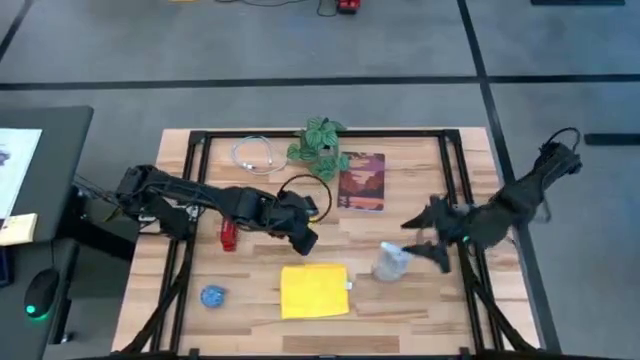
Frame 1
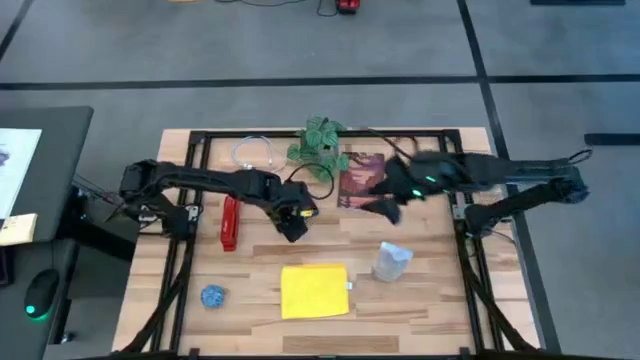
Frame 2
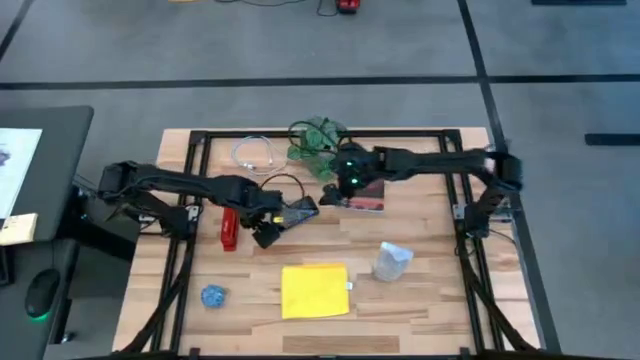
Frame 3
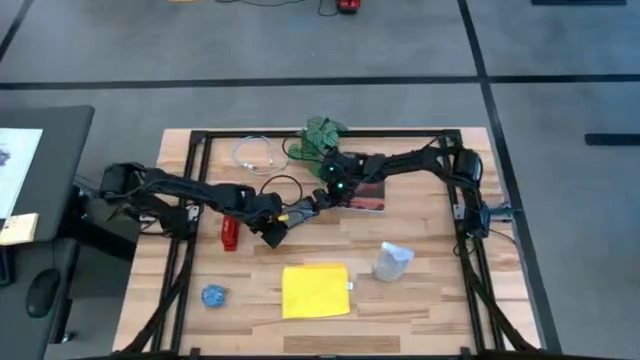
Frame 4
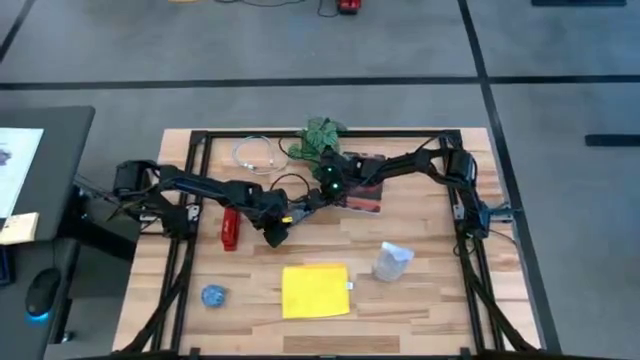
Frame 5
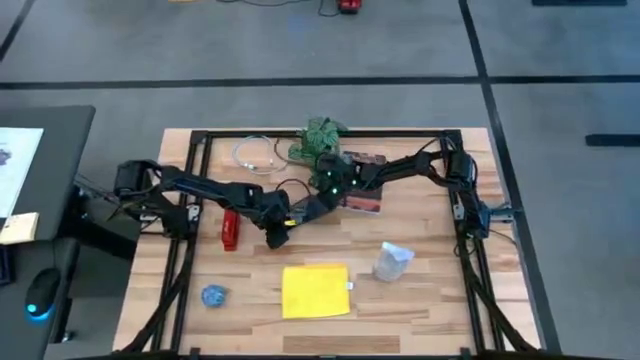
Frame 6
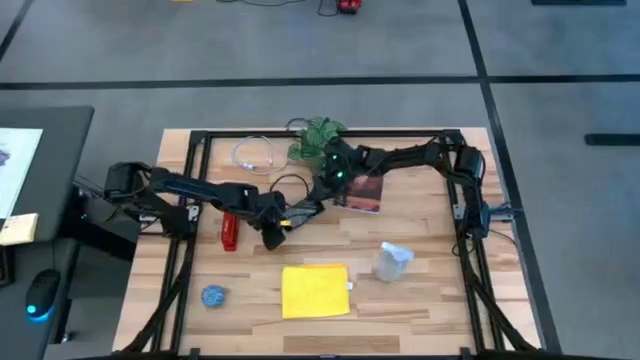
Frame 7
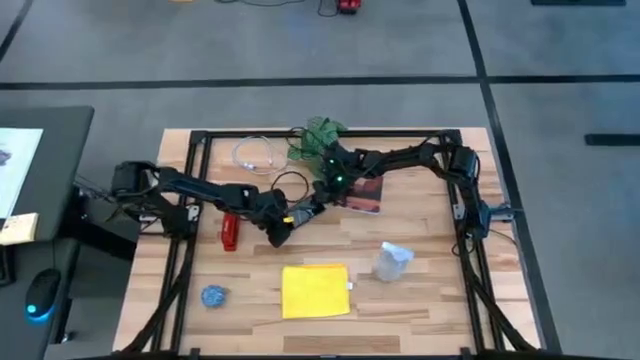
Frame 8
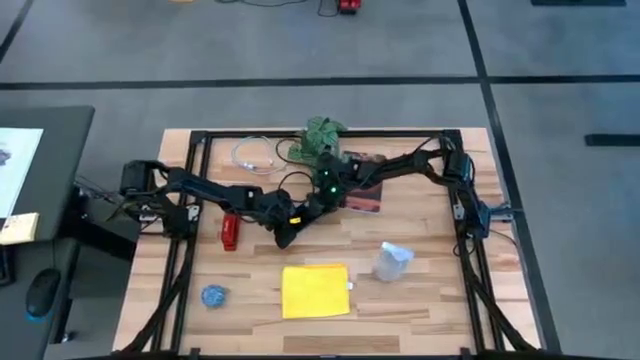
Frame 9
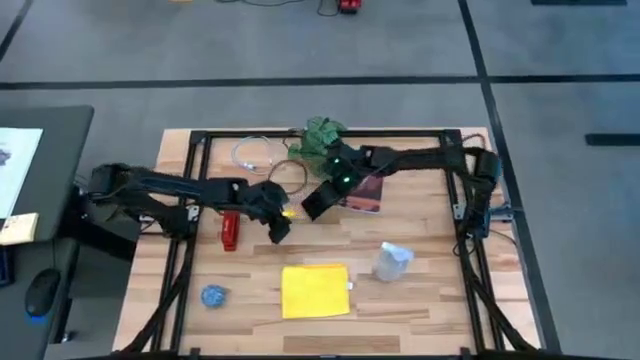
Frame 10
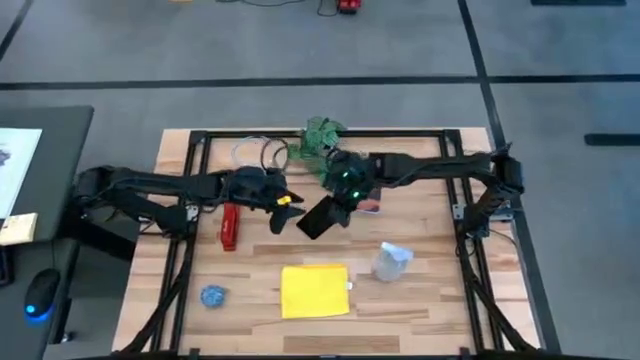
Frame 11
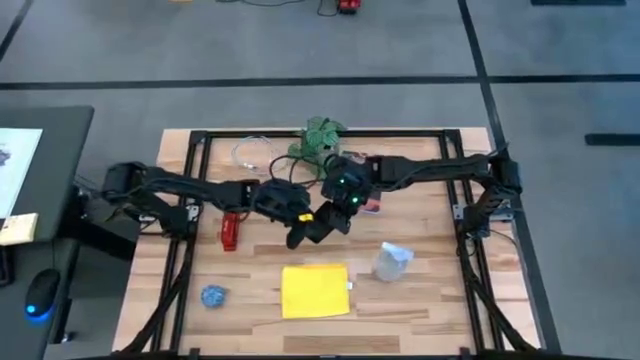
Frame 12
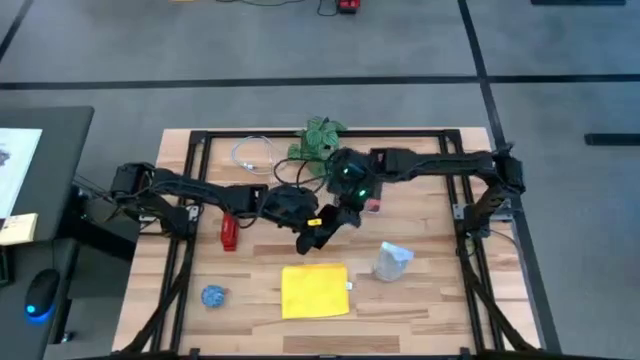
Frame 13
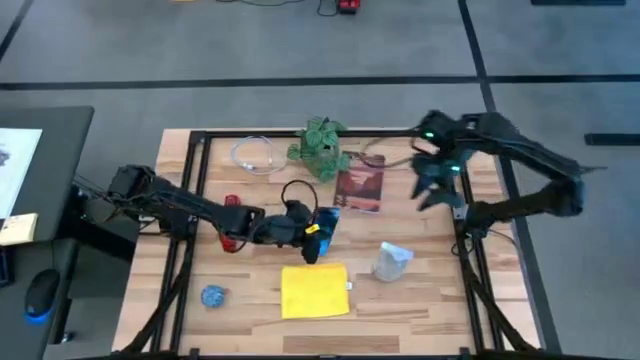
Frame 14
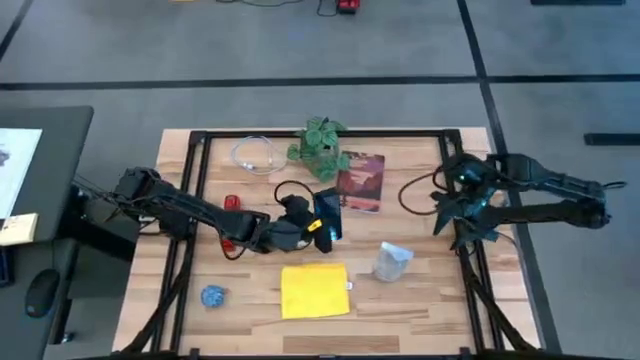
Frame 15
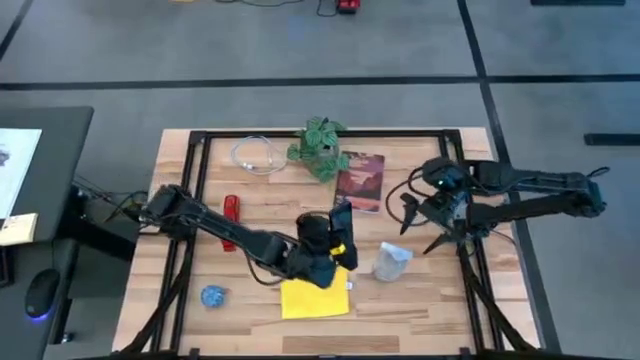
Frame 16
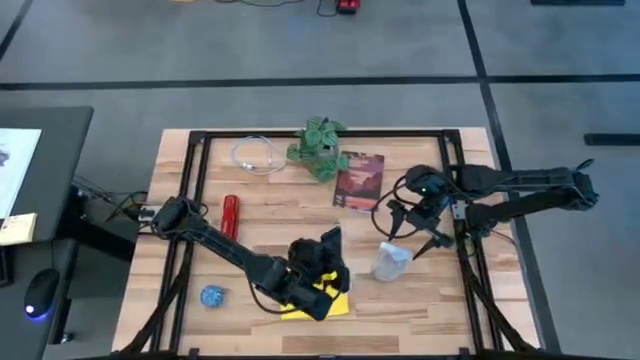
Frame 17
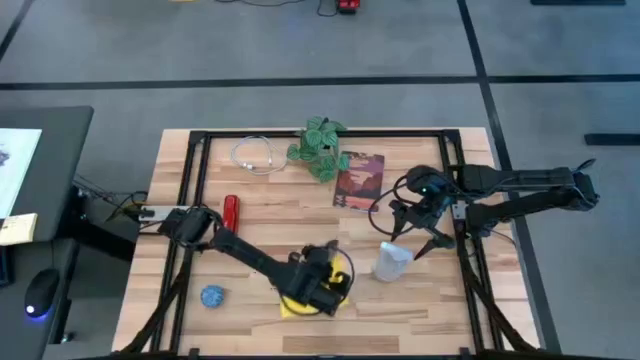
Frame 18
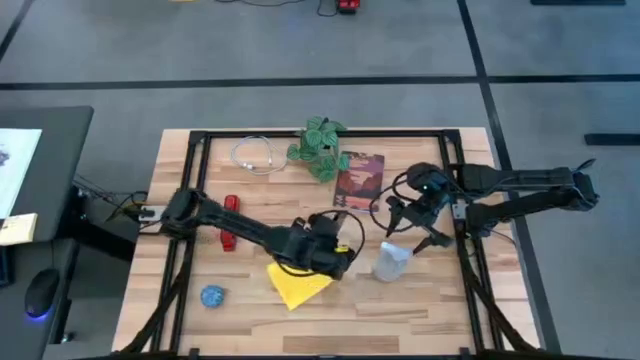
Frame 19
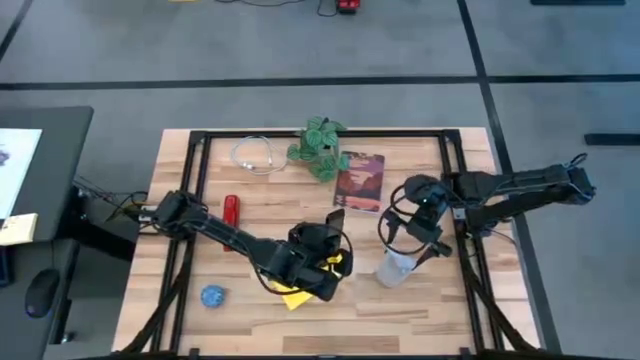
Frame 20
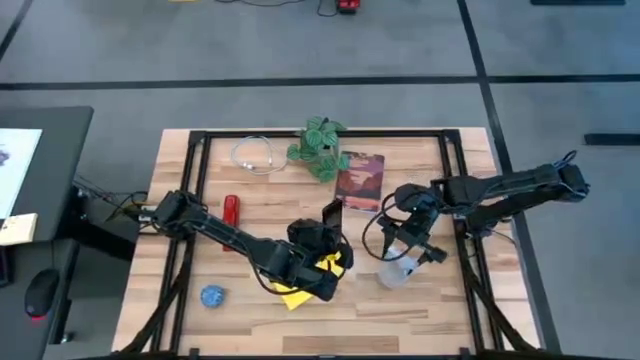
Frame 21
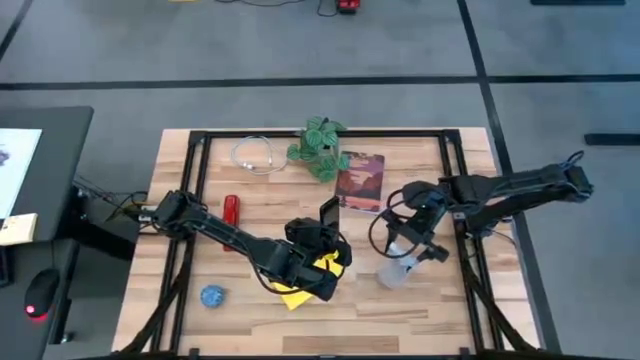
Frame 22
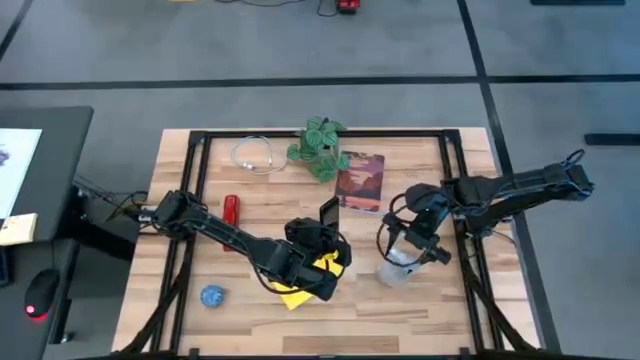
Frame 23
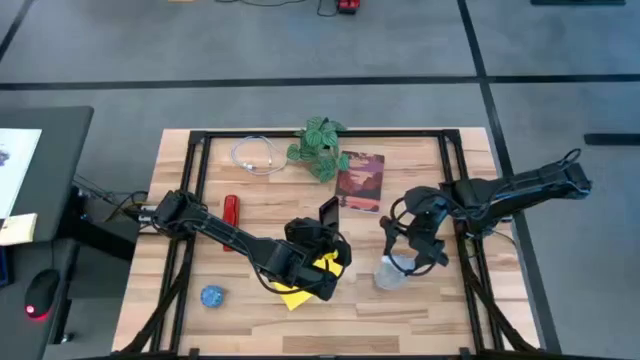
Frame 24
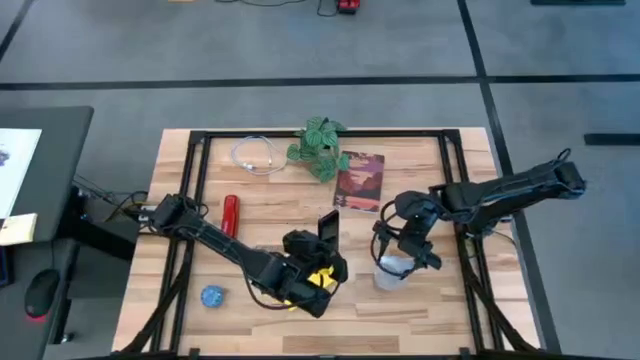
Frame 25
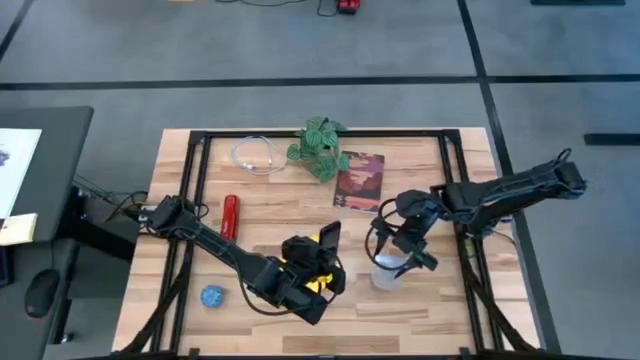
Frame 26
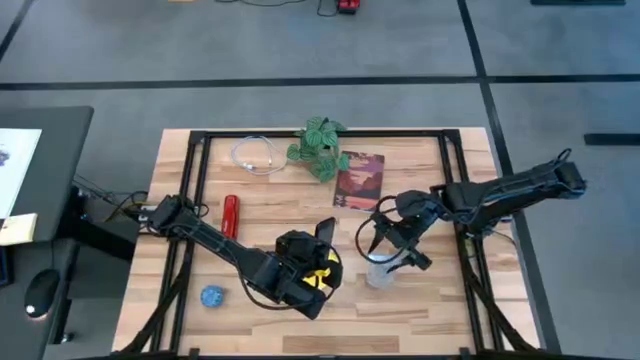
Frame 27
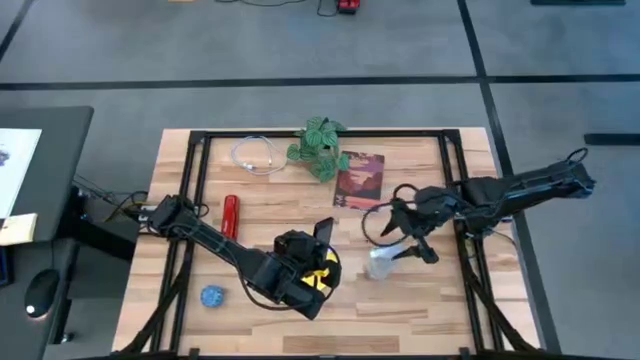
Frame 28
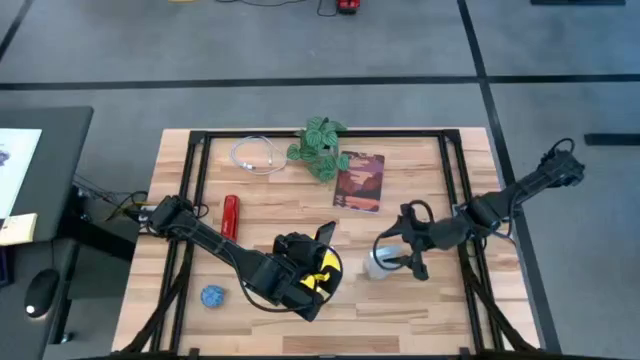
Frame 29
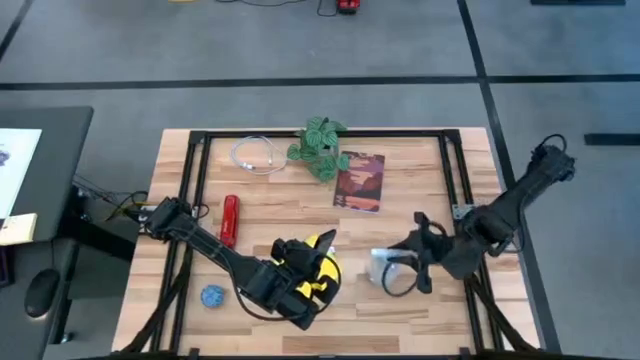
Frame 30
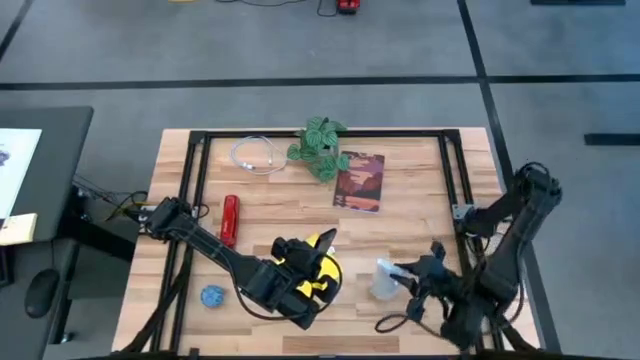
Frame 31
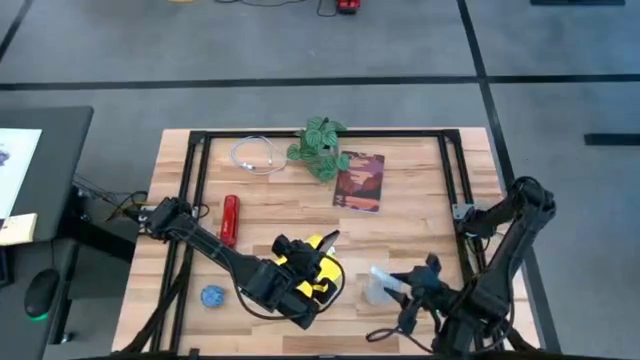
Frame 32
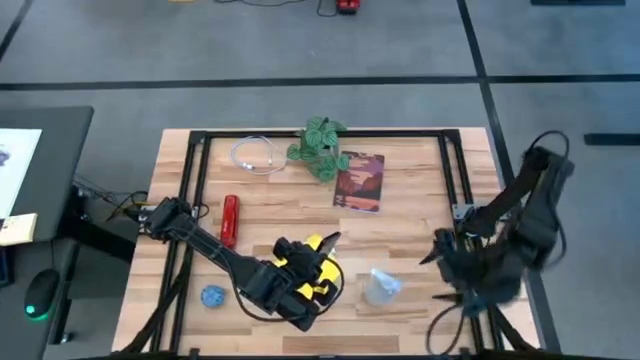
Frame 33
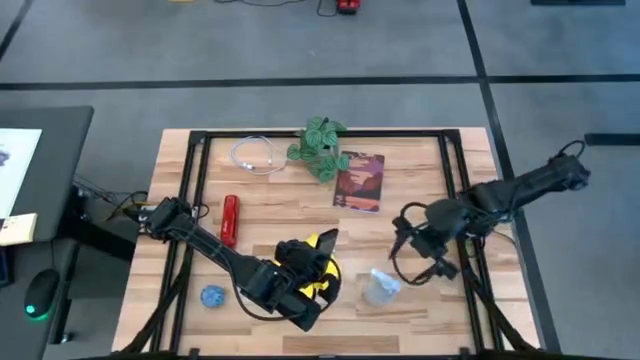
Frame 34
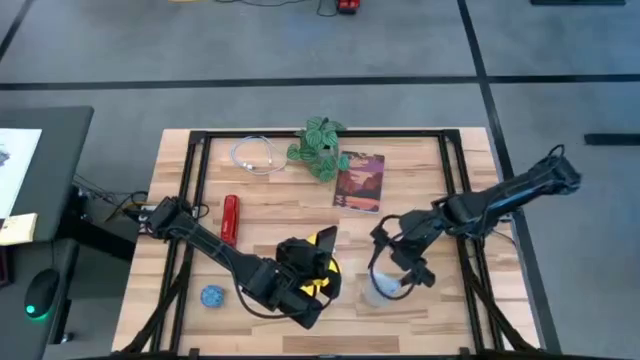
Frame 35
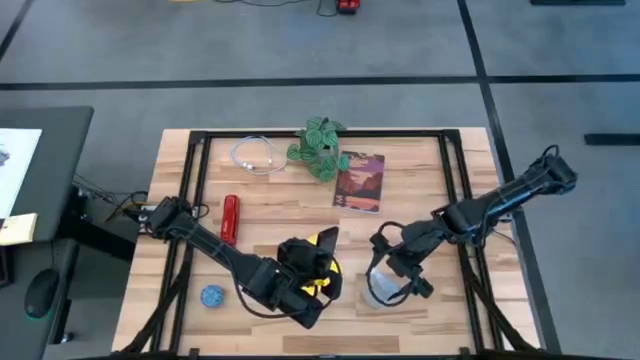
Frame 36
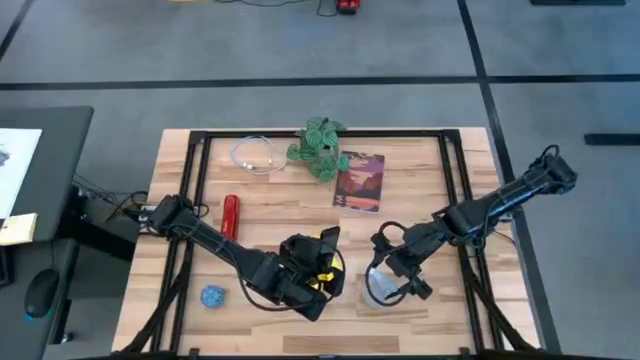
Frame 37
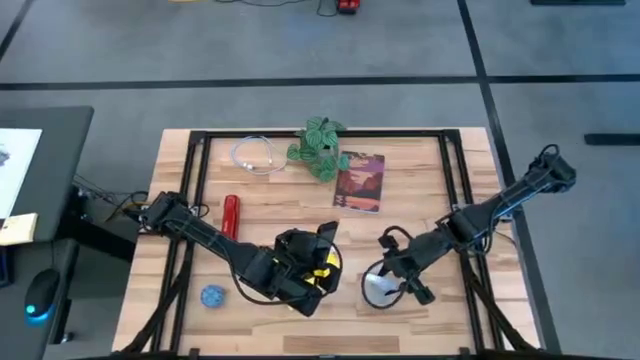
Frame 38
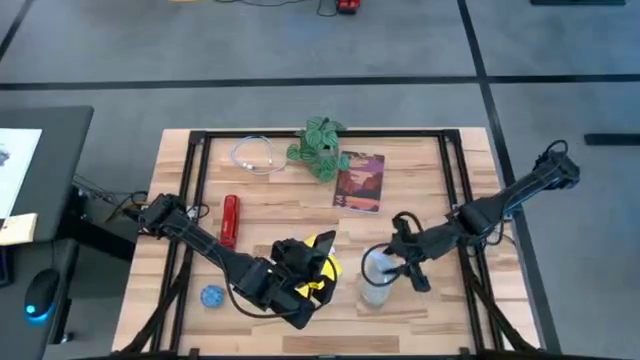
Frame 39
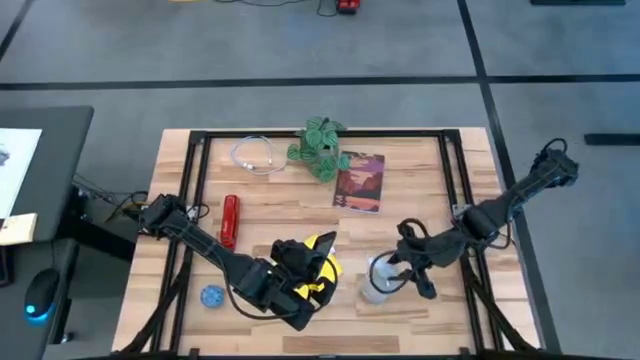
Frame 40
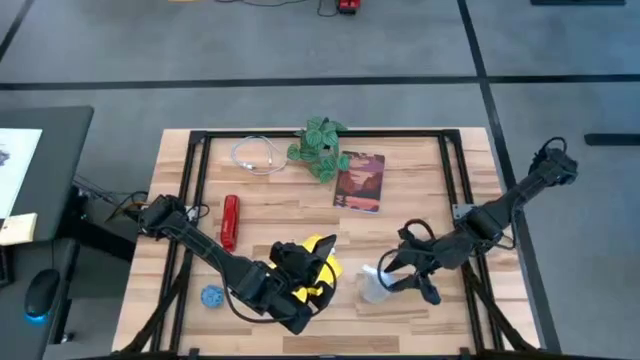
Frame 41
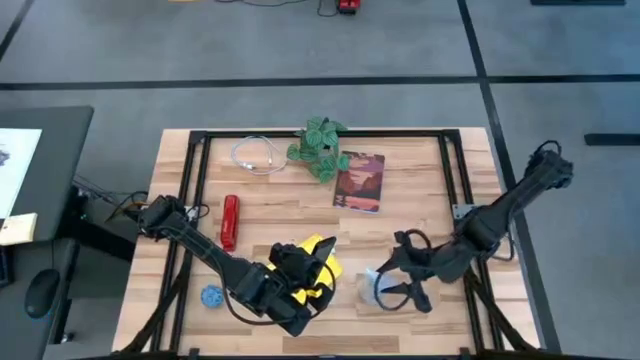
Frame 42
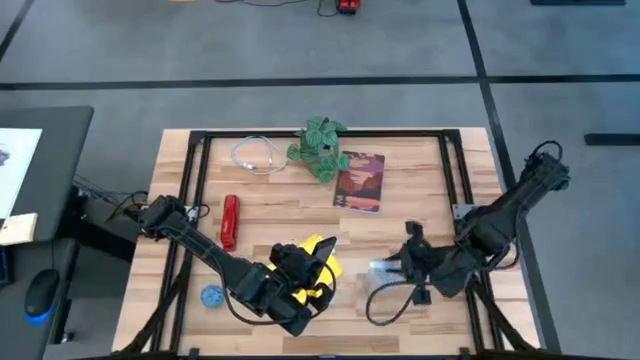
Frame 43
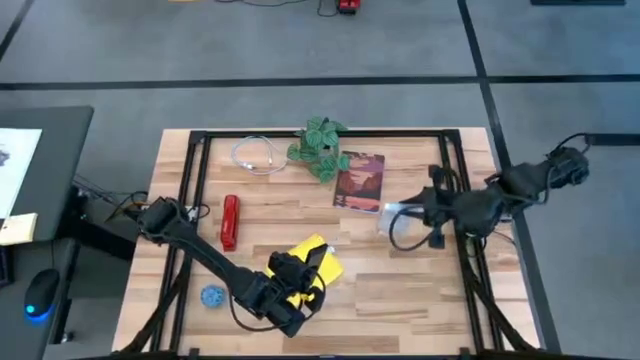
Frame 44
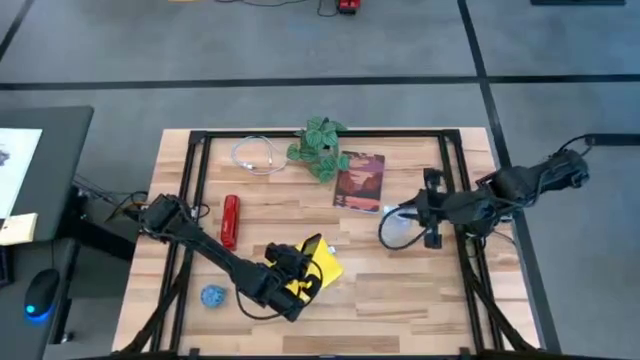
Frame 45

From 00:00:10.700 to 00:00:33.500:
Task: Apply microfiber cloth
Spray the front of the cellphone using the spray cleaning bottle
